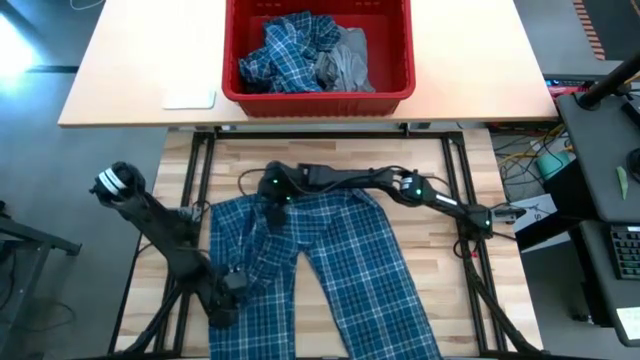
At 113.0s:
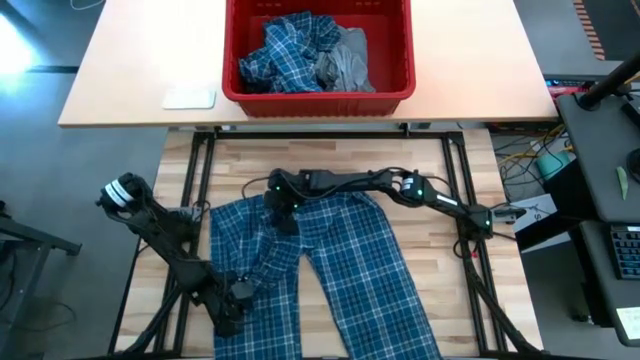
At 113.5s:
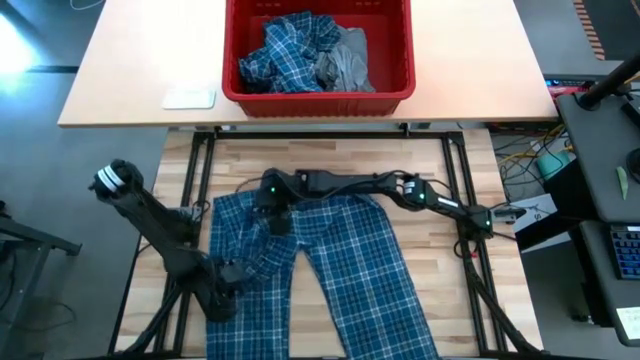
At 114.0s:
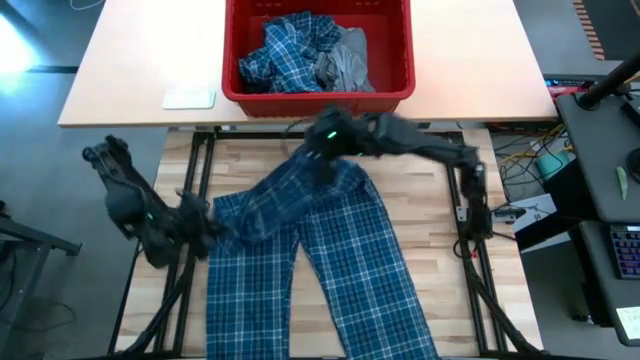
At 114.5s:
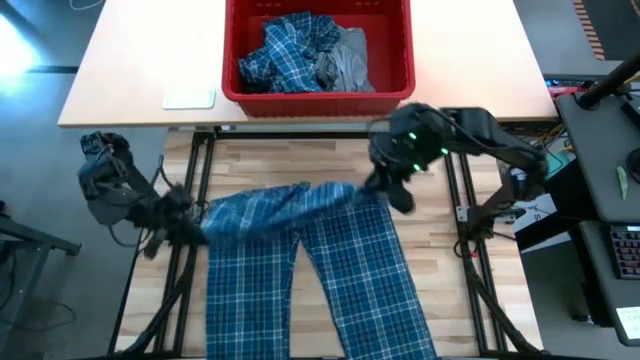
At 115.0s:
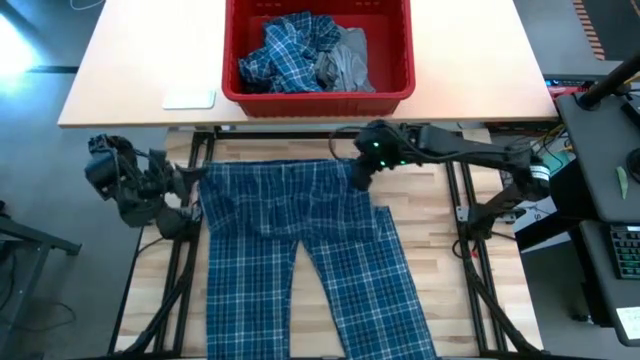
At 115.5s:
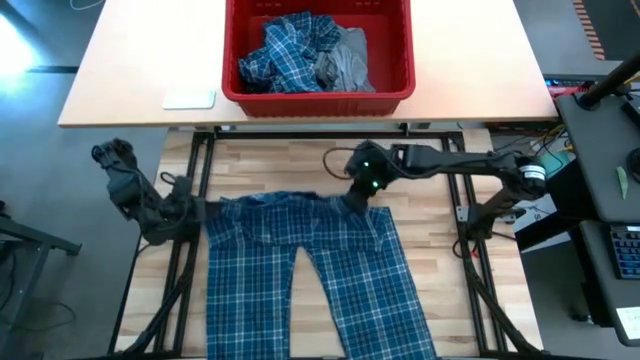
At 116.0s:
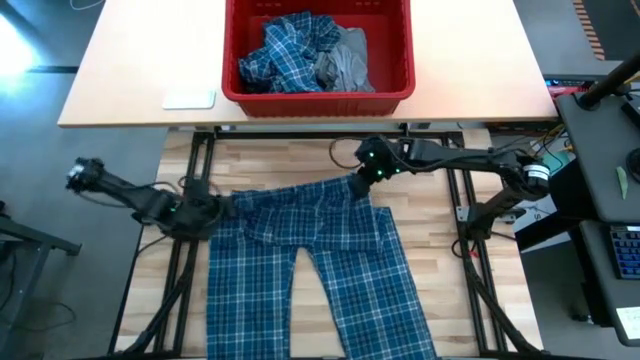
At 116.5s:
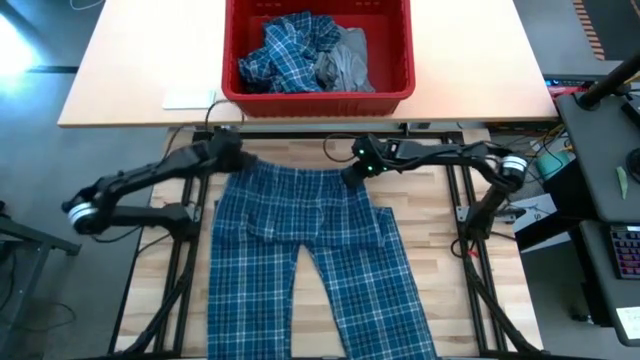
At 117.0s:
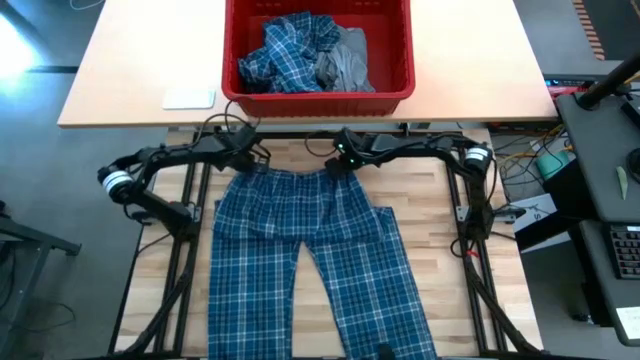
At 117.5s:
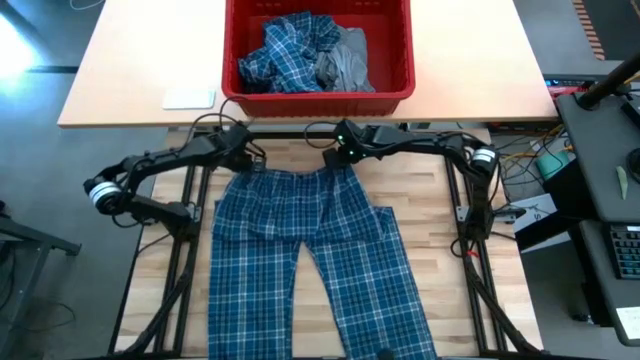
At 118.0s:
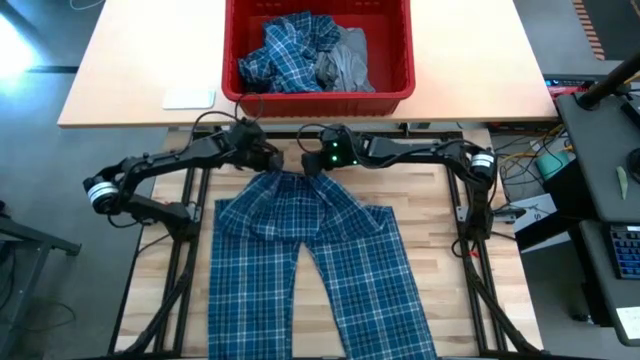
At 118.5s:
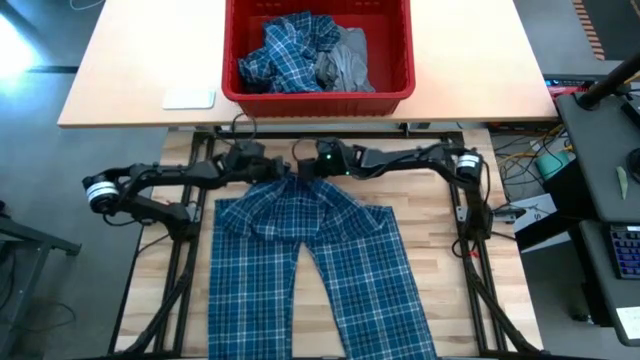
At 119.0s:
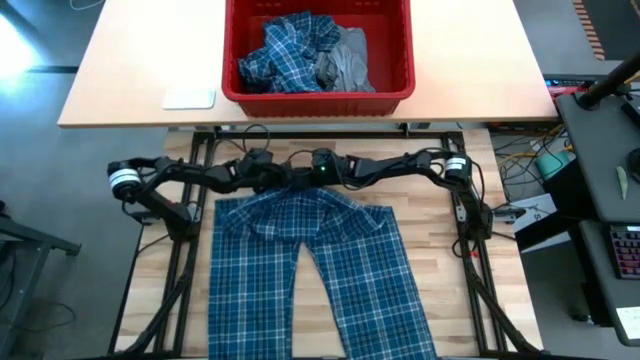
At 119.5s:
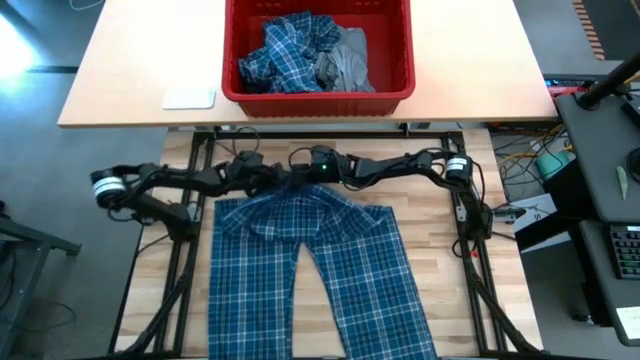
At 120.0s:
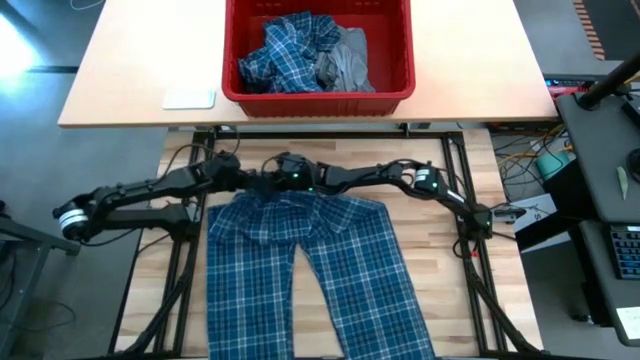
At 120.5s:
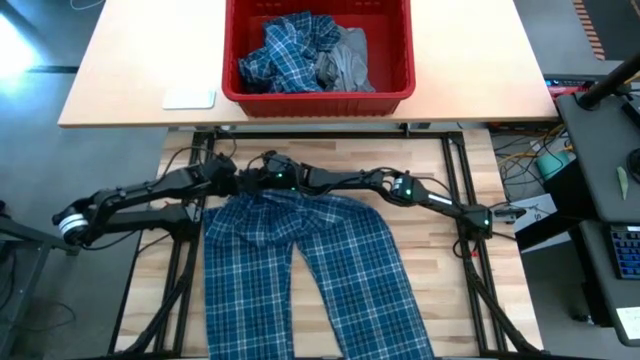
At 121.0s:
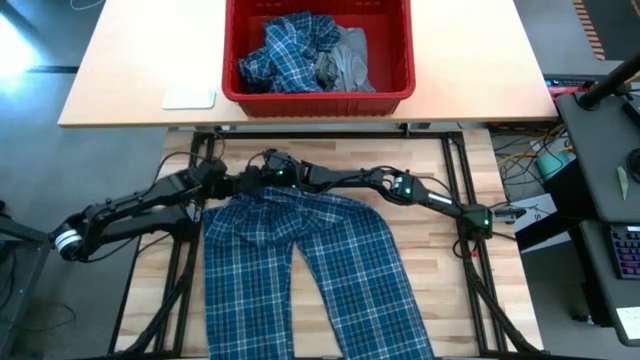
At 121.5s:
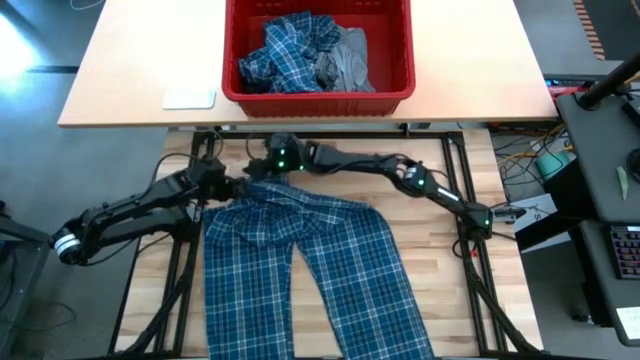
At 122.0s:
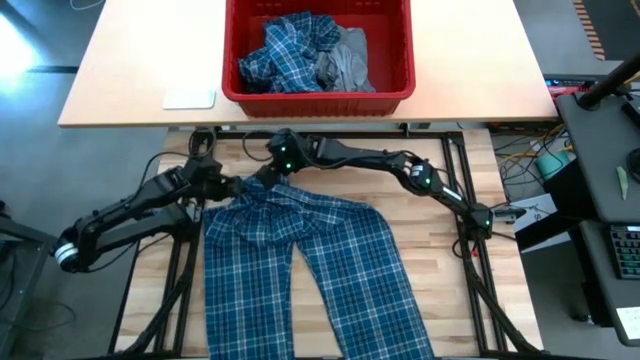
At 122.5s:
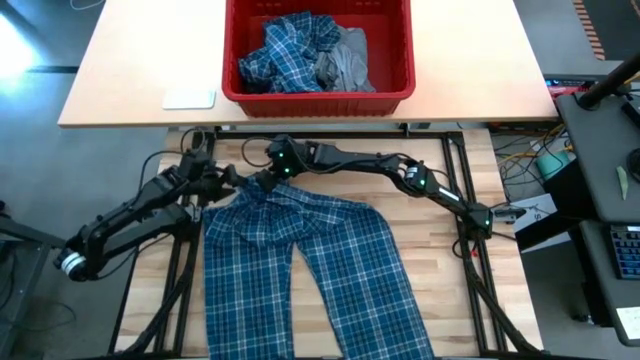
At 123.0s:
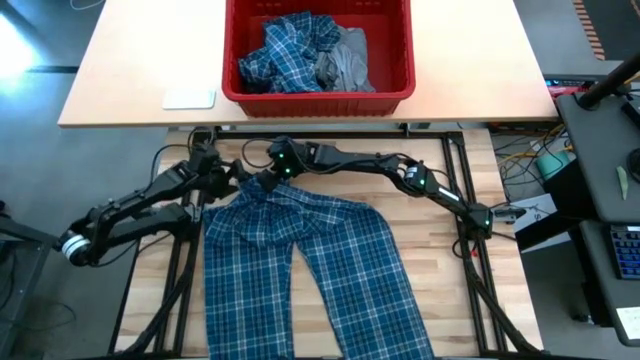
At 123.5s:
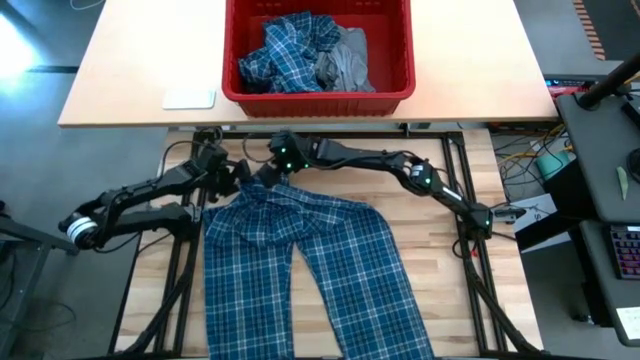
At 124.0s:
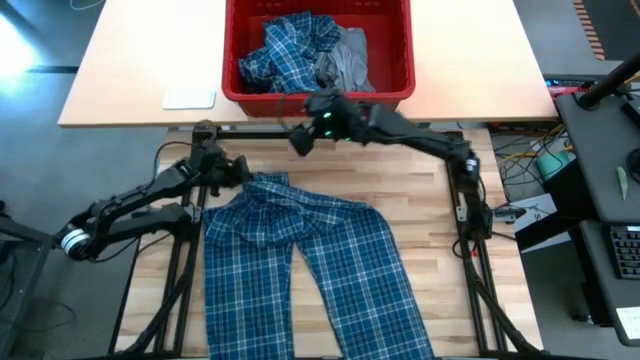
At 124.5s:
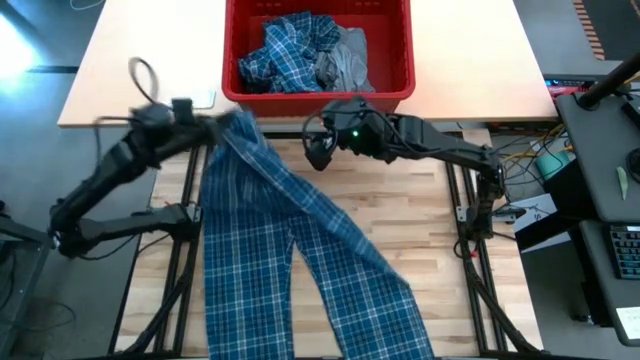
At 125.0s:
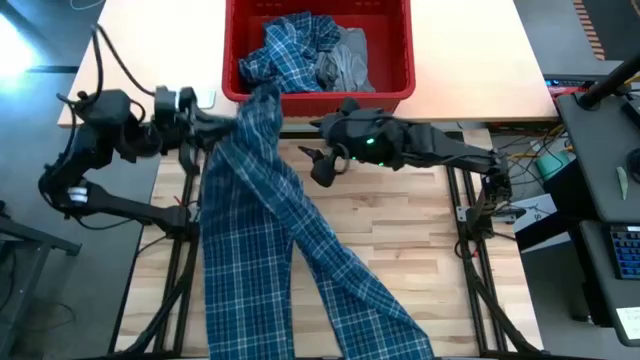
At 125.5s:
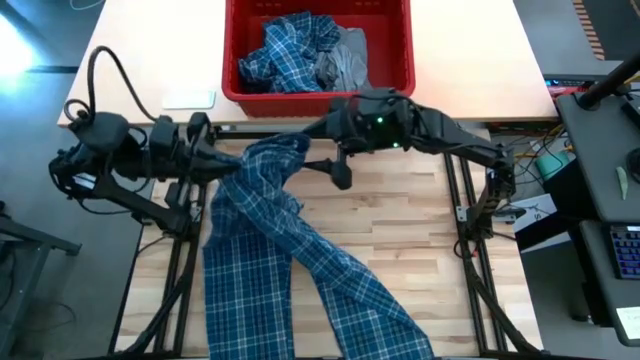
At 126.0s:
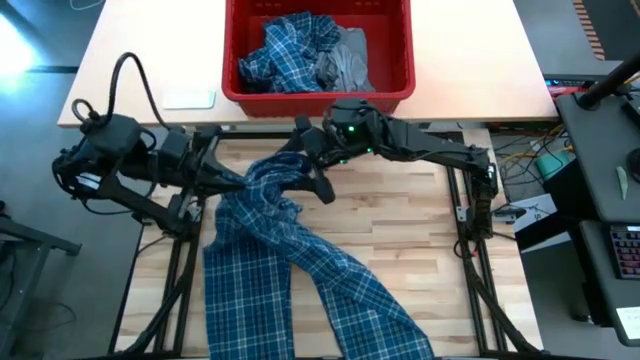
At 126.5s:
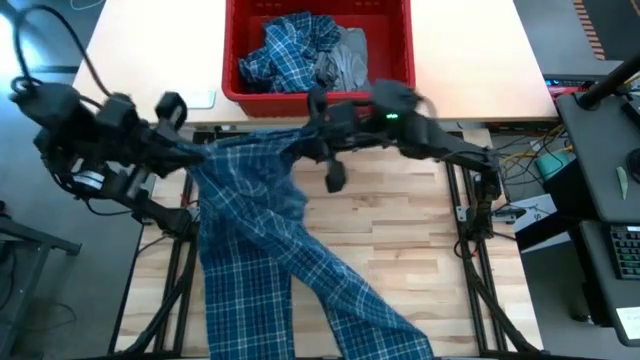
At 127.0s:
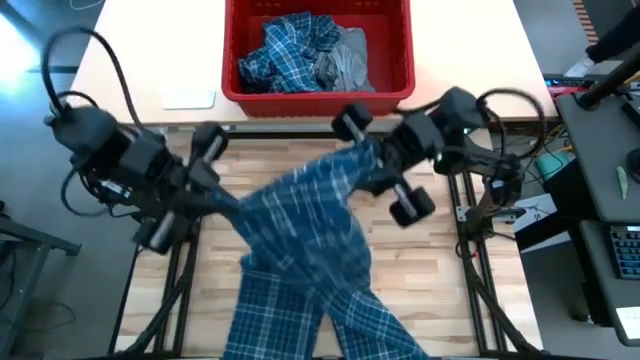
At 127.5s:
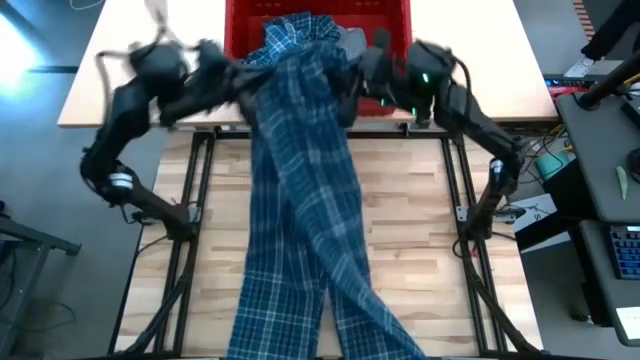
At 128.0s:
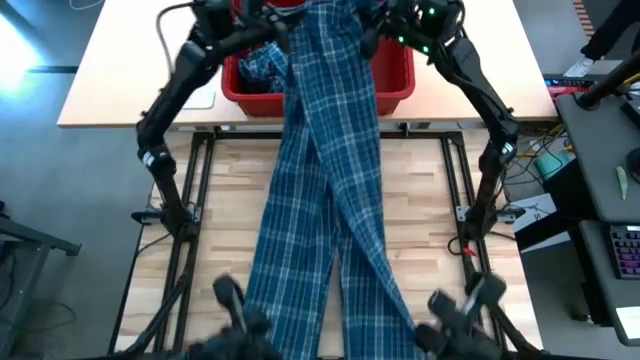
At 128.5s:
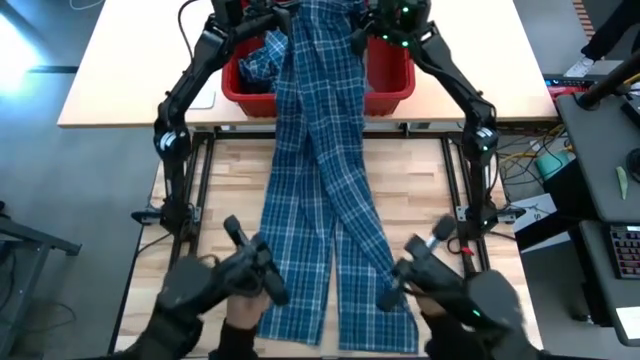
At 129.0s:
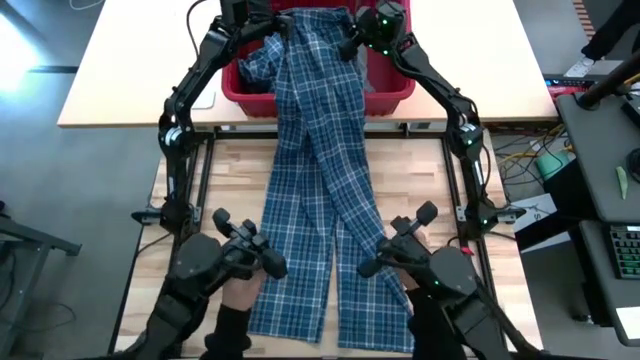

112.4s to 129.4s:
Task: Fold Laundry from Bin
Fold the blue patterned pants

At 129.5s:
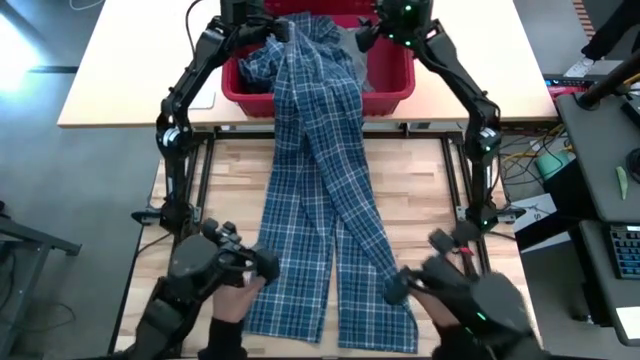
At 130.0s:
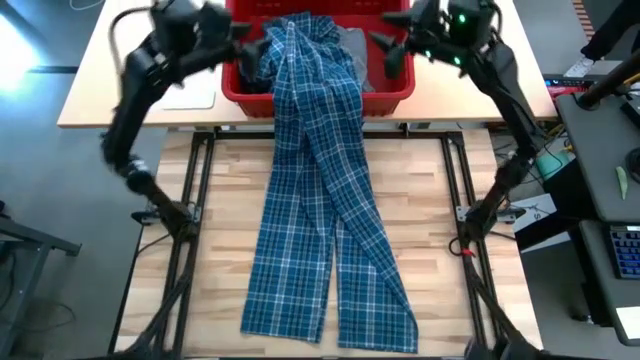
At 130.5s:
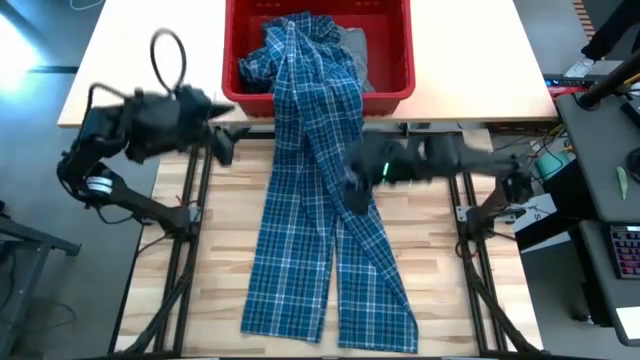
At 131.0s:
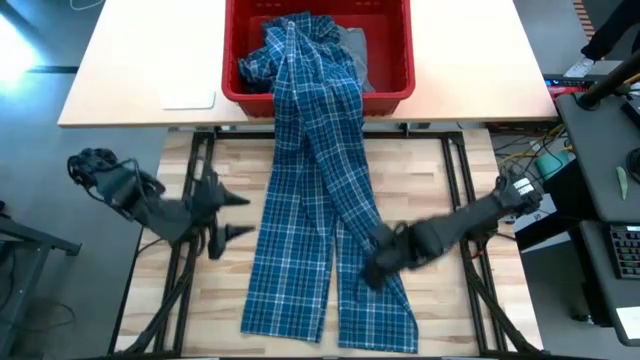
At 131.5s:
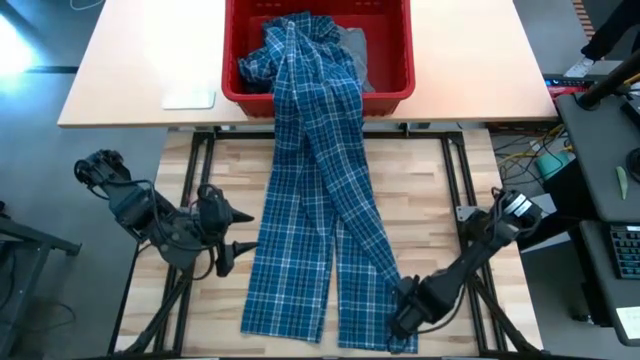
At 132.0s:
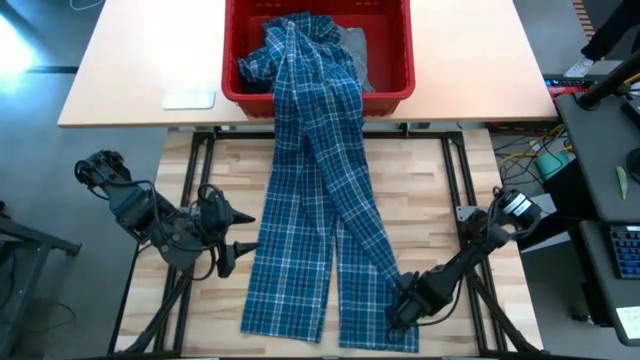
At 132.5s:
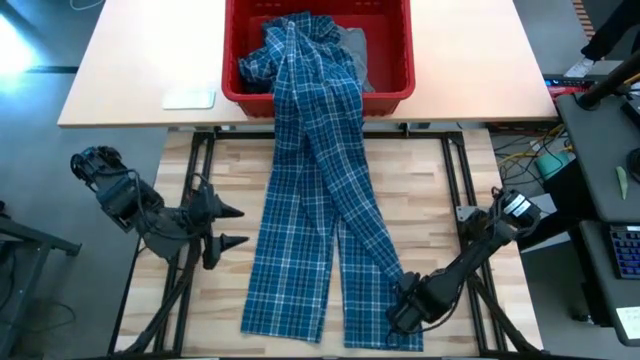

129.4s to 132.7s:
Fold the blue patterned pants
